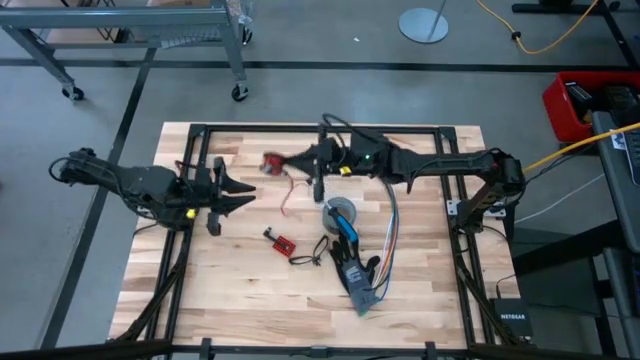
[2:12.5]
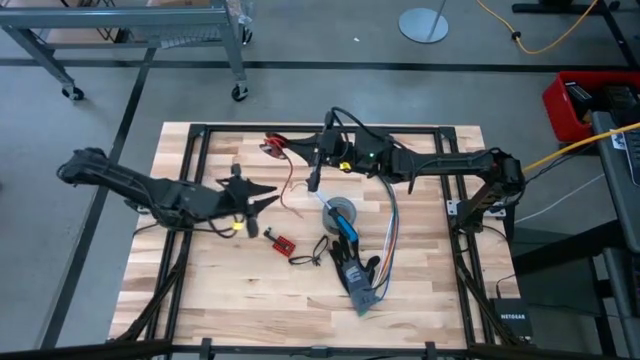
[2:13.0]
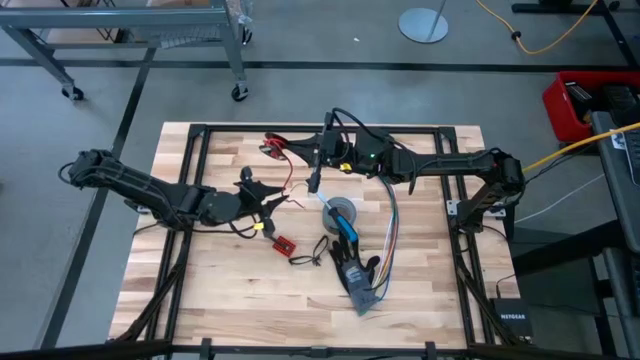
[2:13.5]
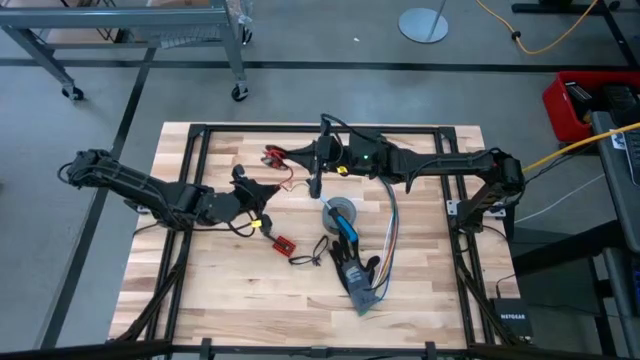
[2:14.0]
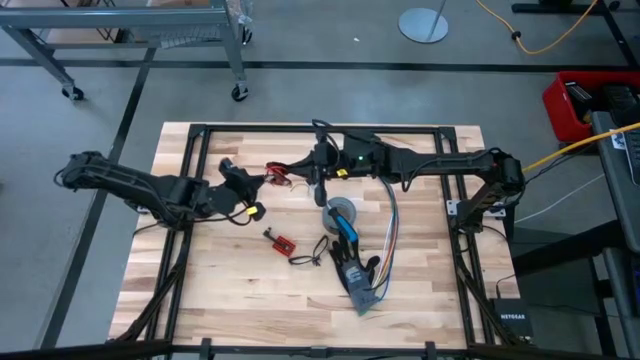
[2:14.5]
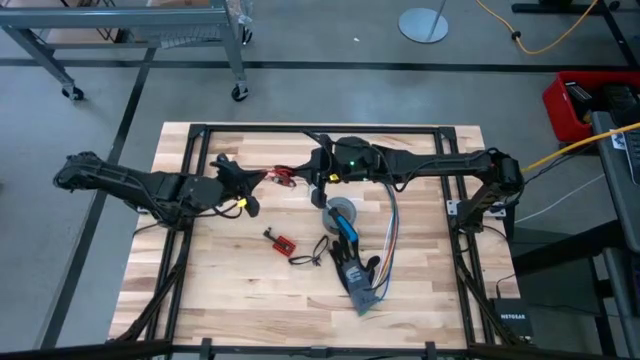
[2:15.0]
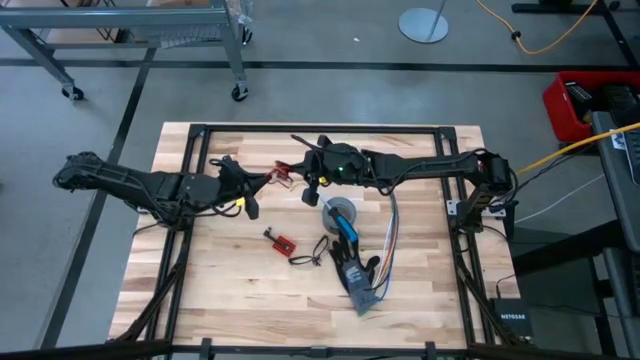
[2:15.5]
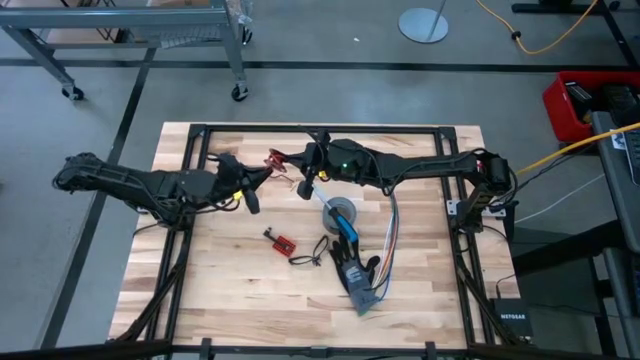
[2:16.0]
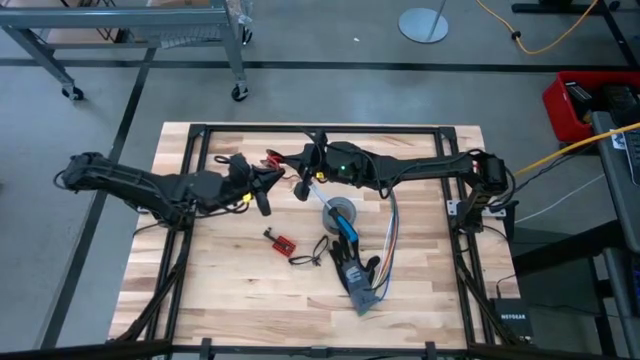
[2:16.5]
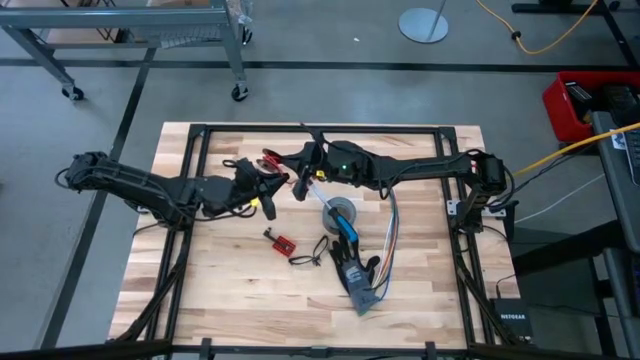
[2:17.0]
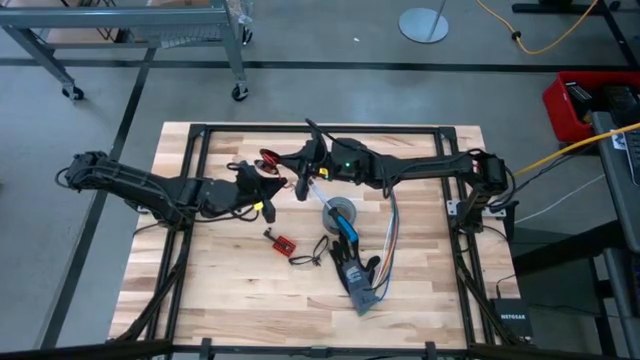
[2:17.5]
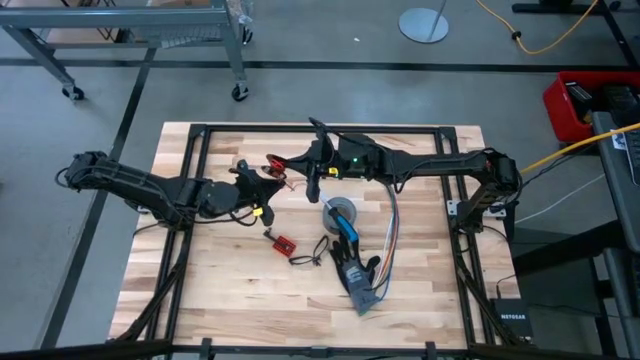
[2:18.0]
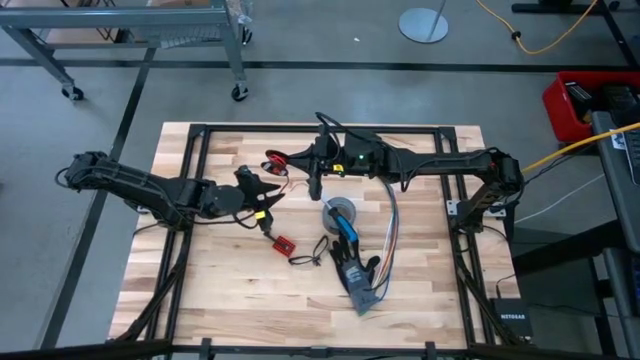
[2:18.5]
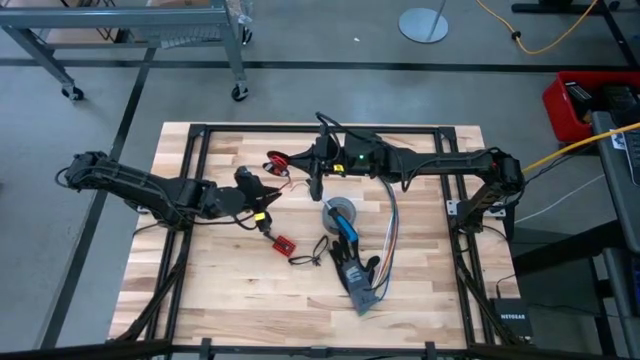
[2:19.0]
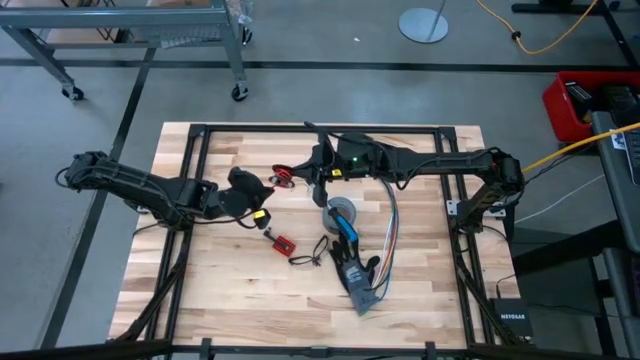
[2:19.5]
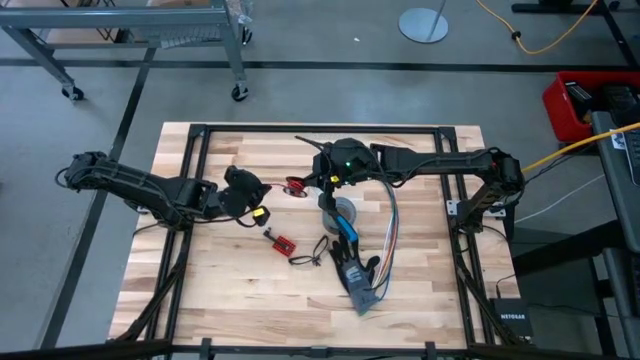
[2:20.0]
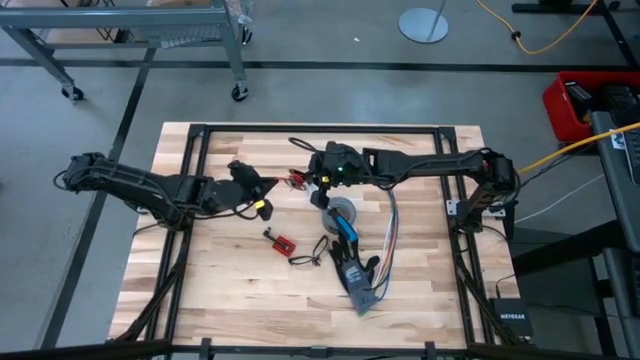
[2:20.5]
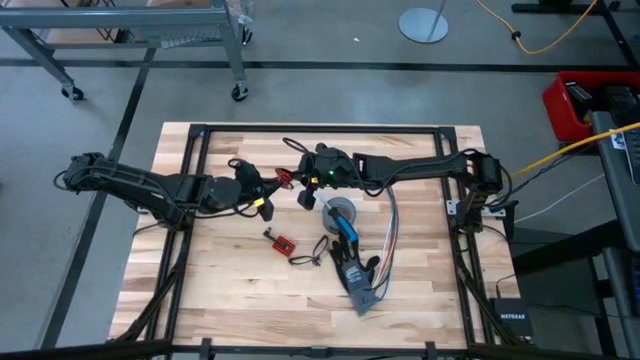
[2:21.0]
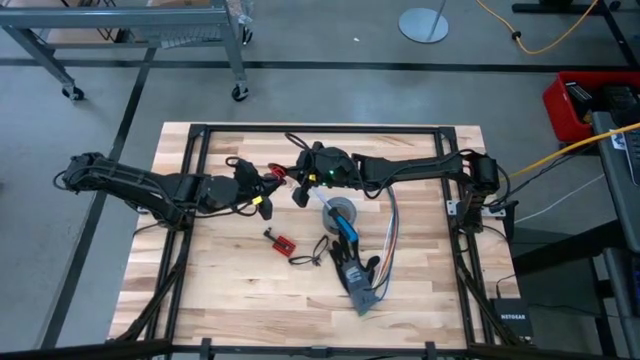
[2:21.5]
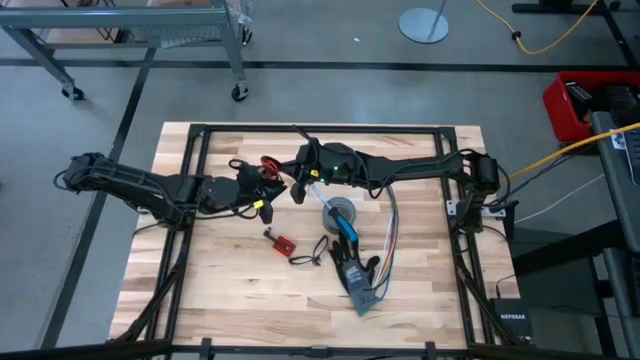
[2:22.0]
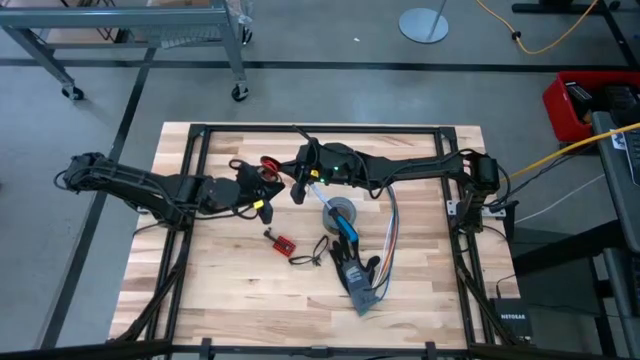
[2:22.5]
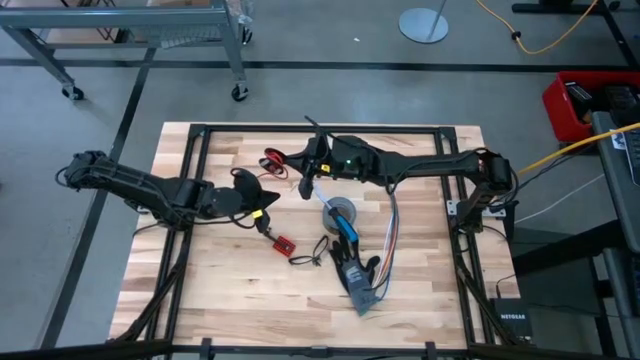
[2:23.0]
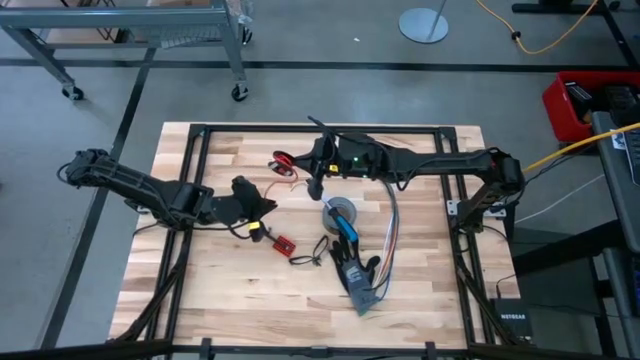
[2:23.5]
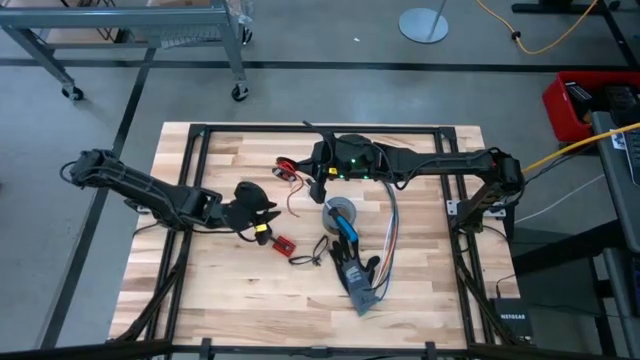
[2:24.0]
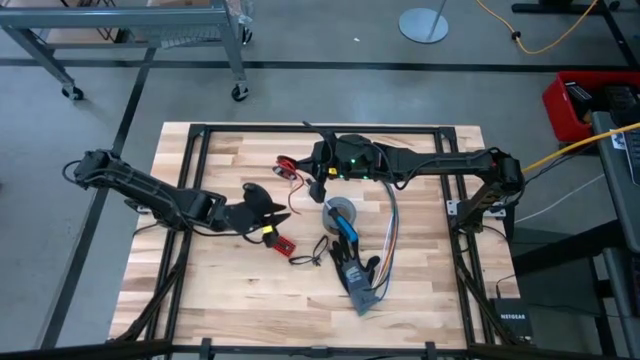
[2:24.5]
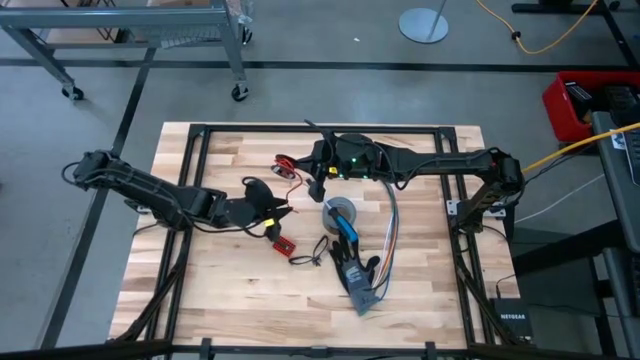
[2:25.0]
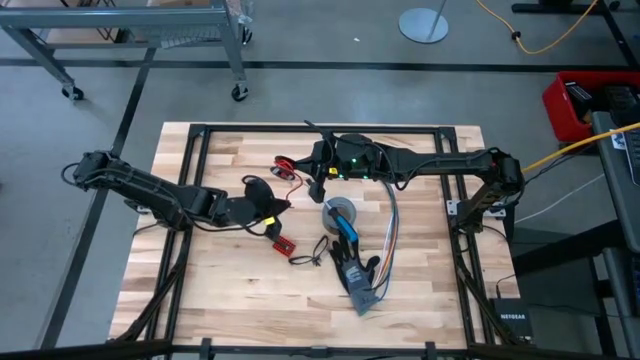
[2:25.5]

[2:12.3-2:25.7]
Task: Coil cords
Coil the red wire around the spool

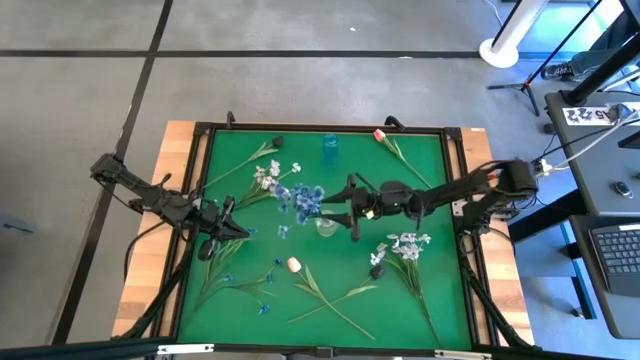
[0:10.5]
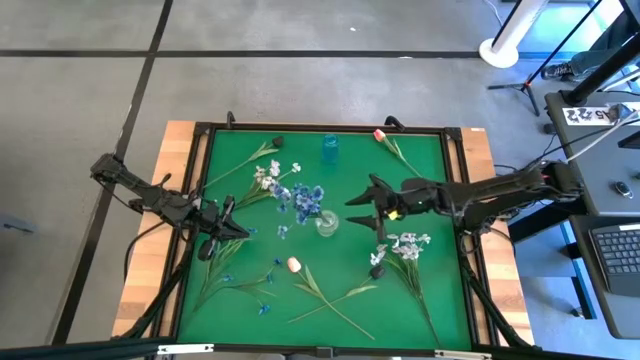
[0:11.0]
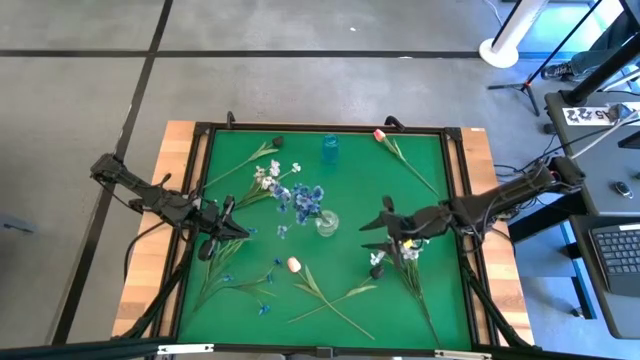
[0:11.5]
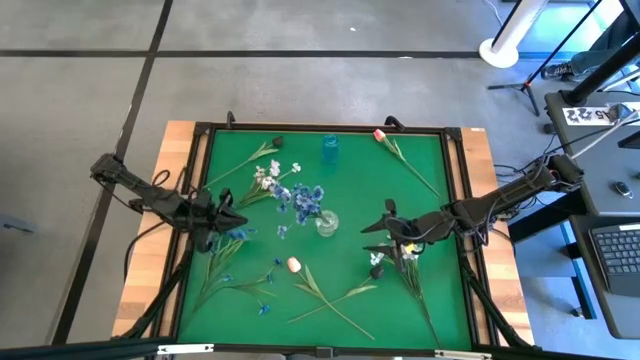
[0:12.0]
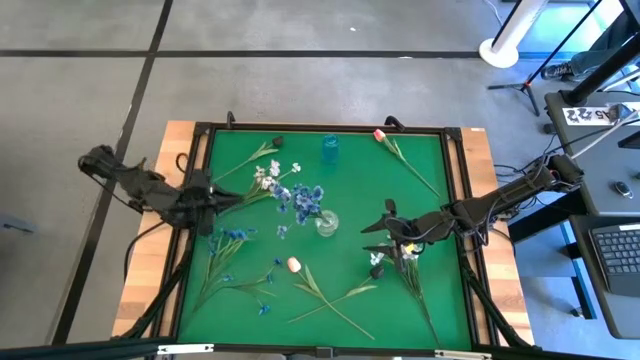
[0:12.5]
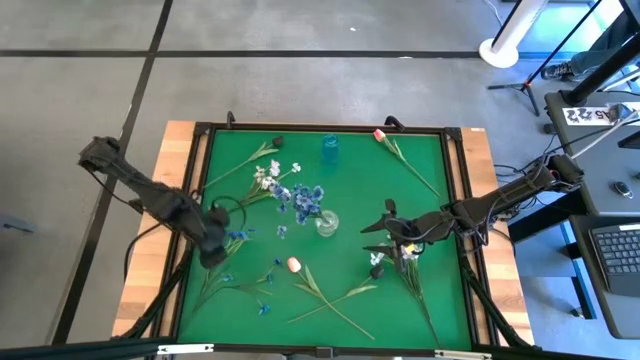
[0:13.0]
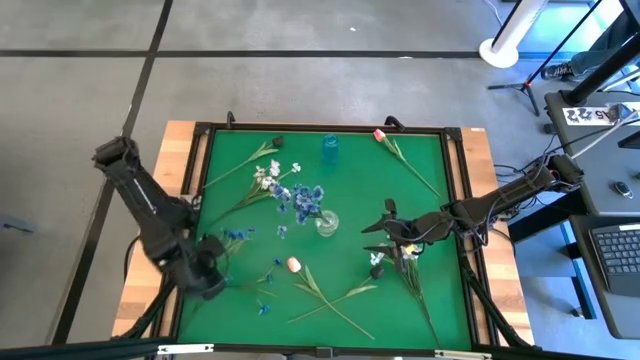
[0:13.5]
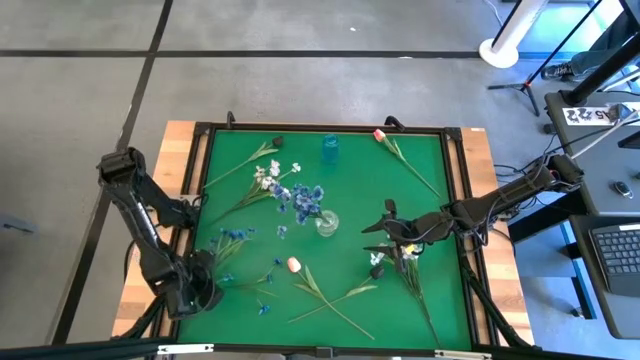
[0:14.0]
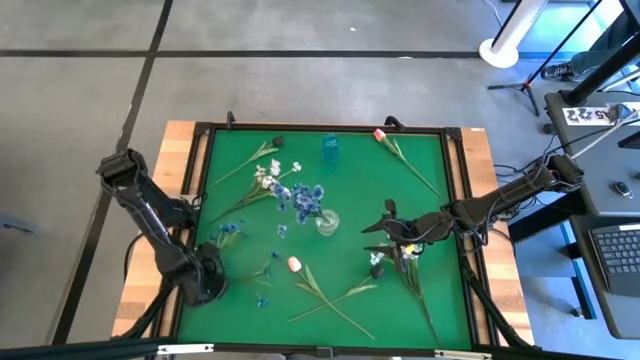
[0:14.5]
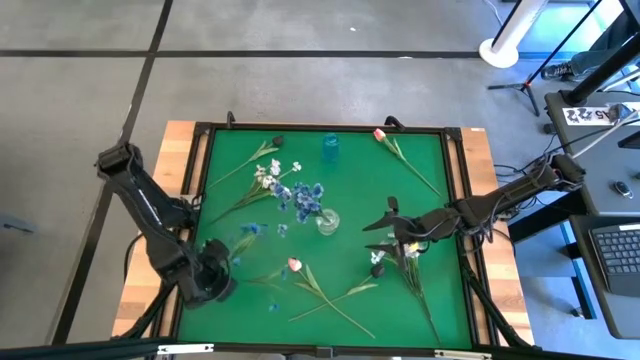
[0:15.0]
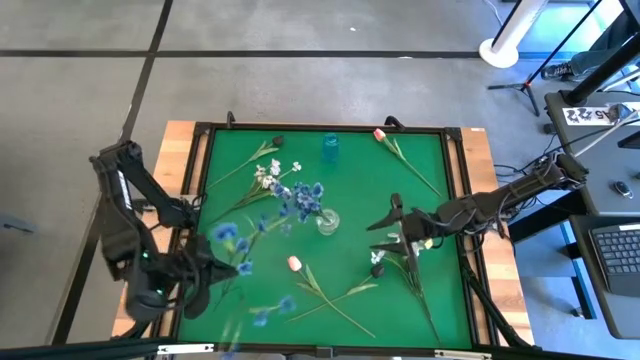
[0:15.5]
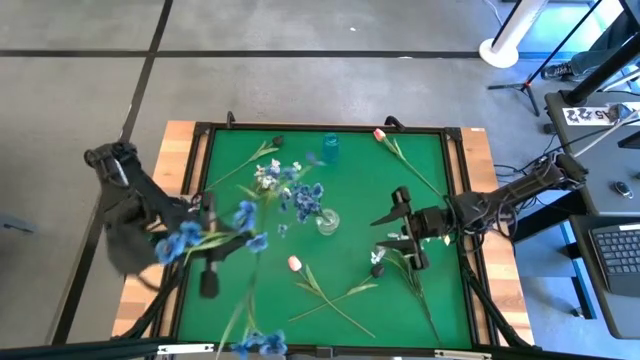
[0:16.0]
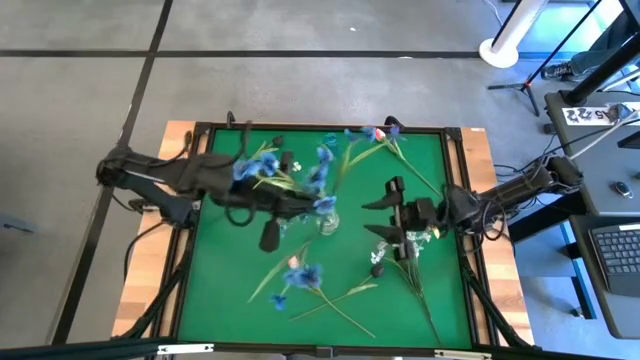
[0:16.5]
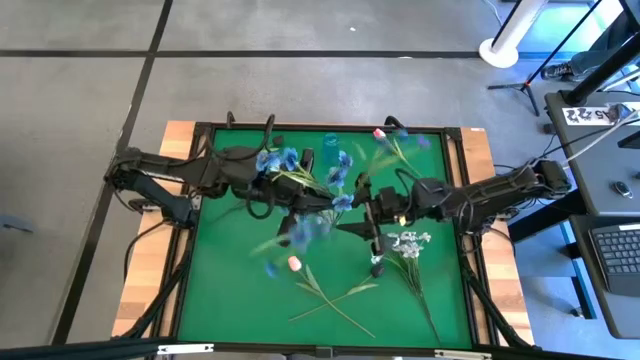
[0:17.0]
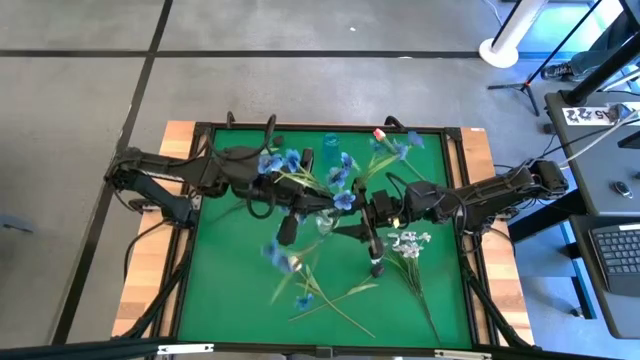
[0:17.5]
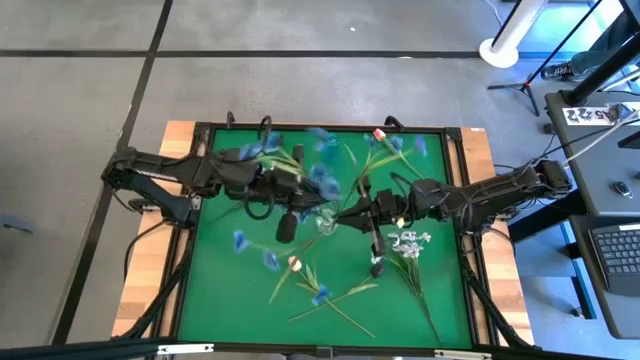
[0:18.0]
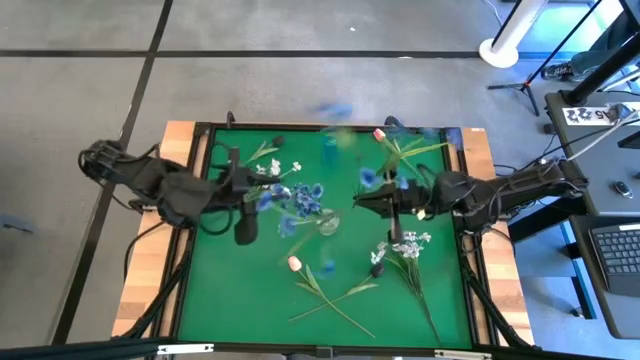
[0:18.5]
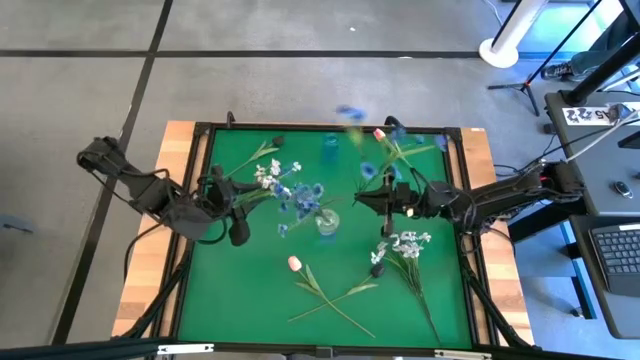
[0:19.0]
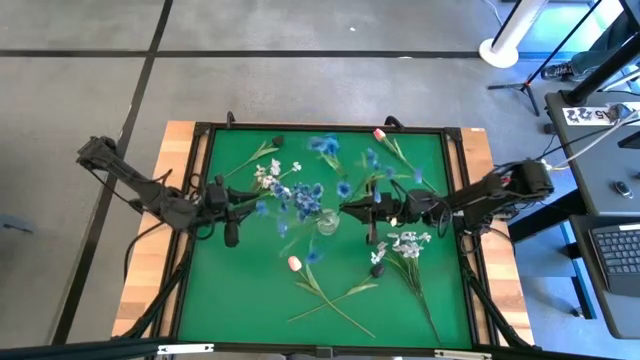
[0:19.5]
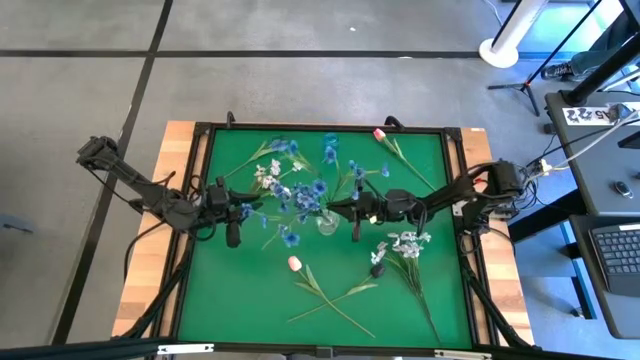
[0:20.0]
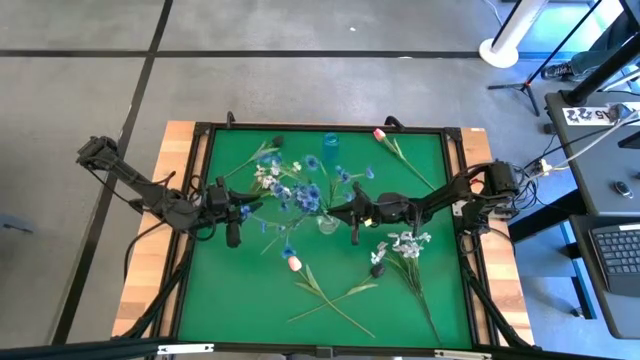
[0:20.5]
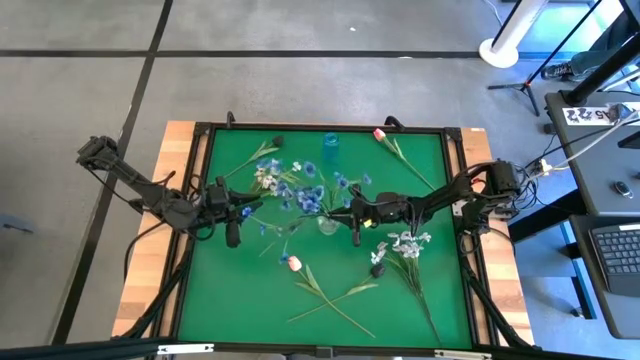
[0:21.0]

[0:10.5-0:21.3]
Task: Sort flowers into vase by color
Put the blue flowers into the transparent vase
